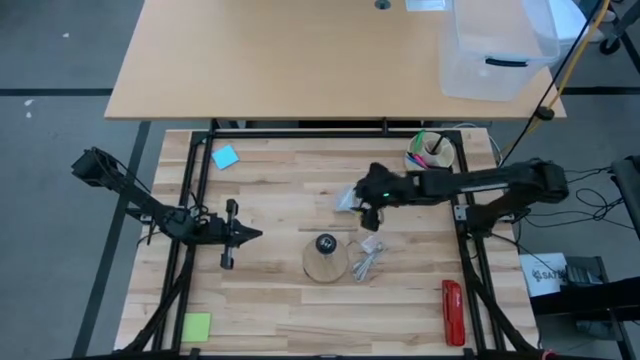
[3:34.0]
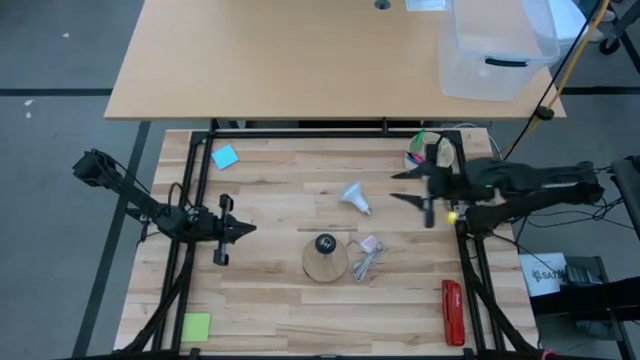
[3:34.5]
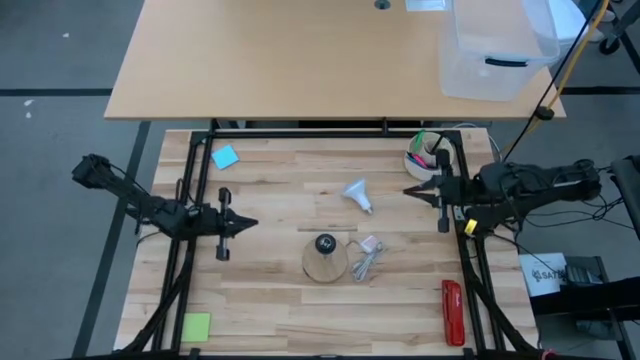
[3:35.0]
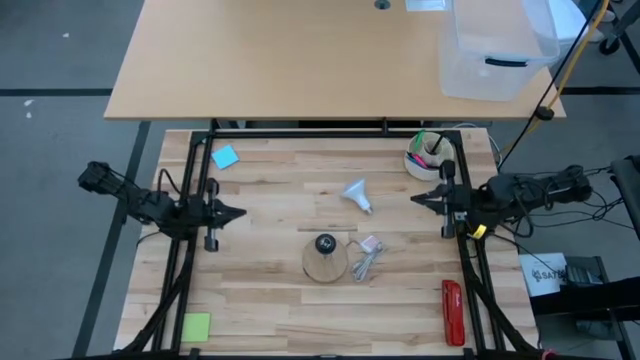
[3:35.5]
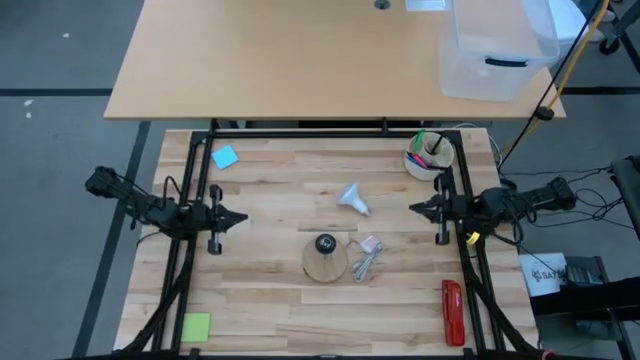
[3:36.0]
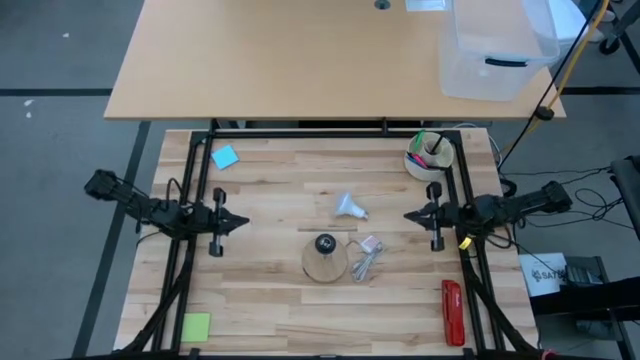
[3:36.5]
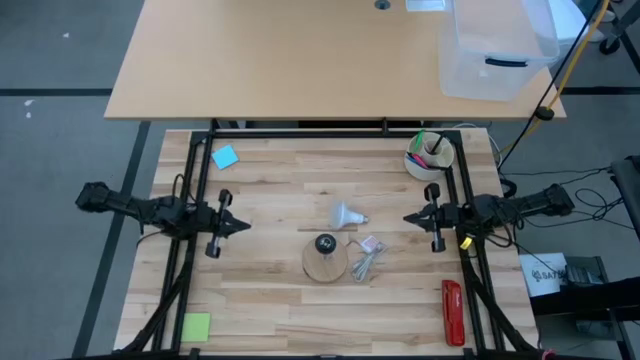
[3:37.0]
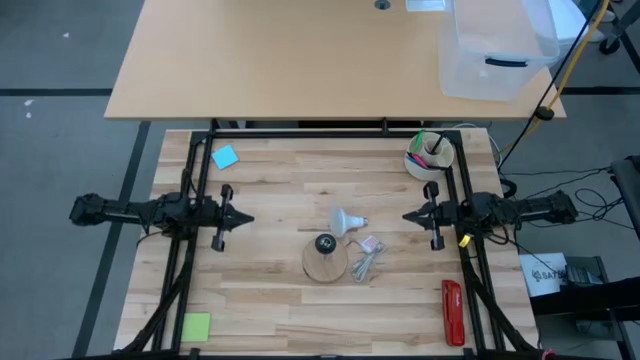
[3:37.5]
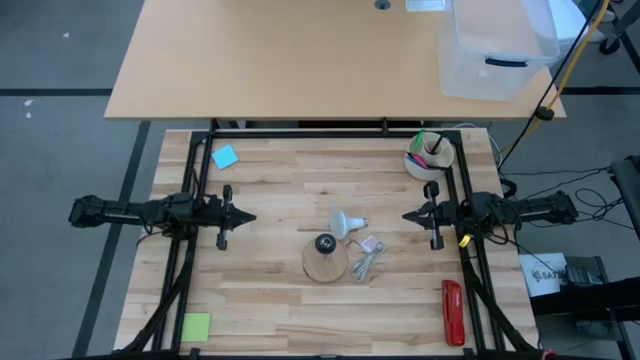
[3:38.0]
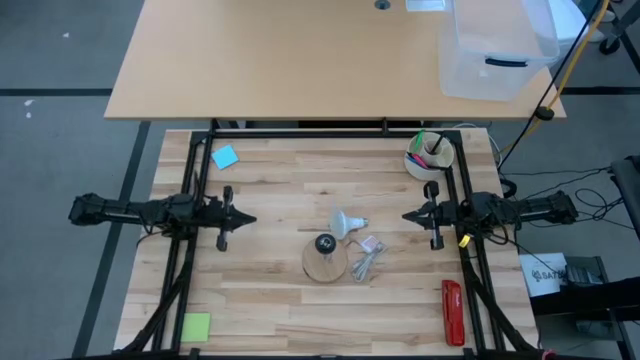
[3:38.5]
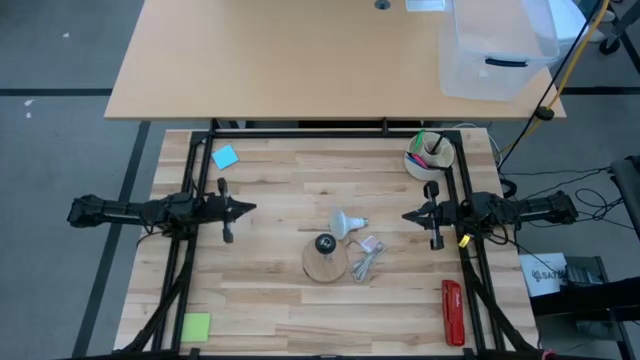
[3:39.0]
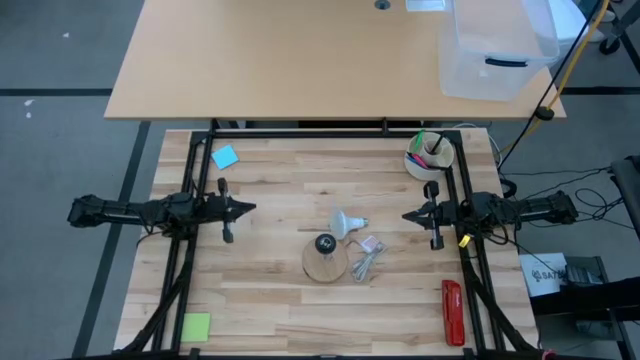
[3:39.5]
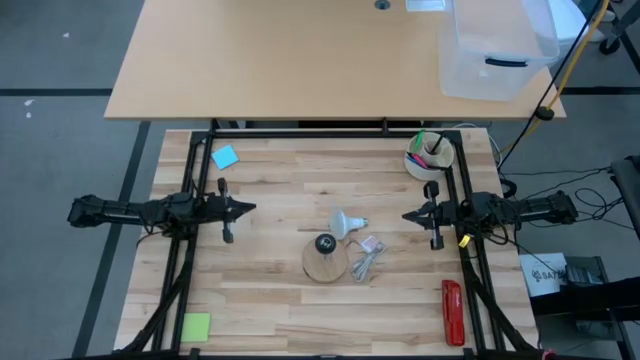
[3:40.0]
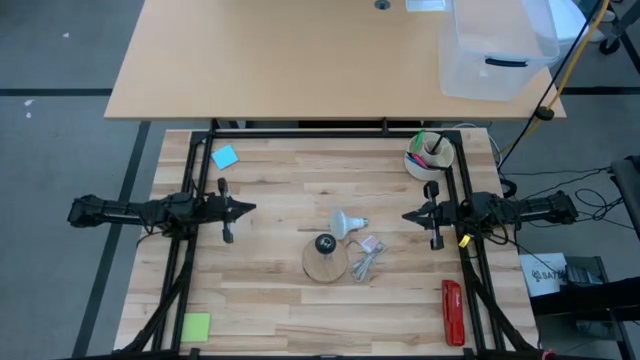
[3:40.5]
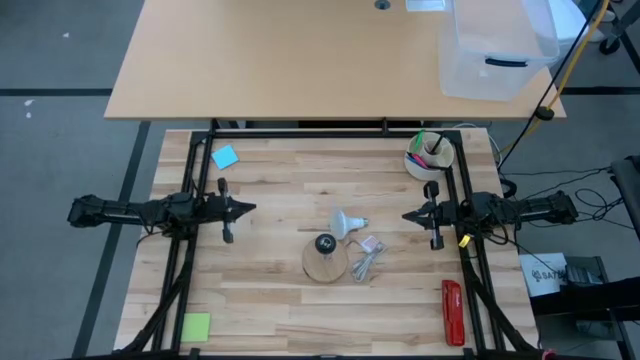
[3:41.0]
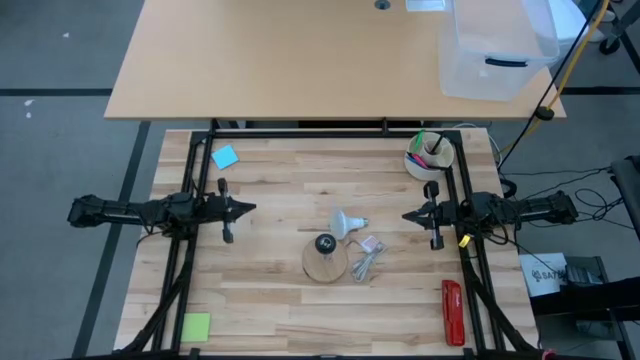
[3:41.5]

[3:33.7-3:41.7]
Task: Screw lightbulb
Return to Home Position

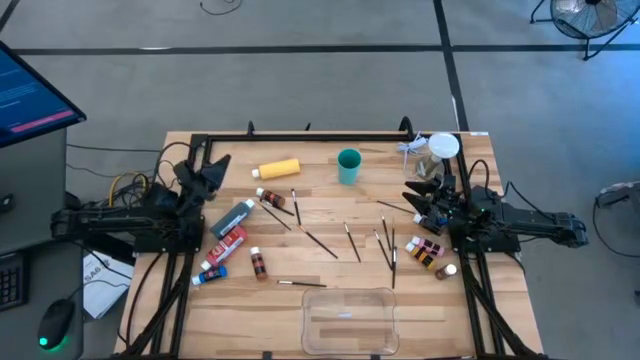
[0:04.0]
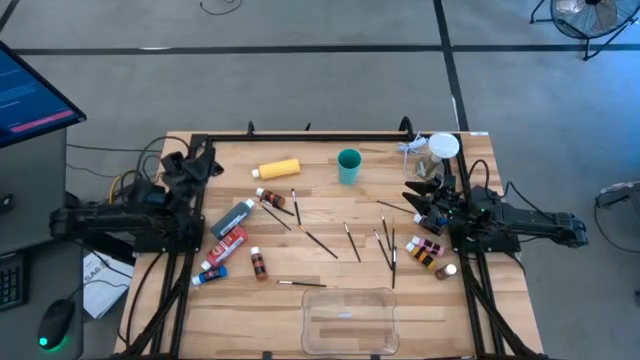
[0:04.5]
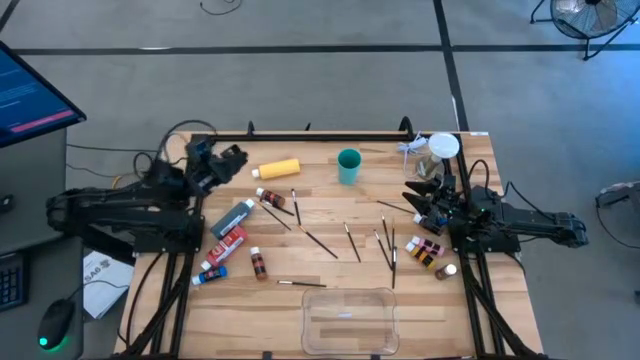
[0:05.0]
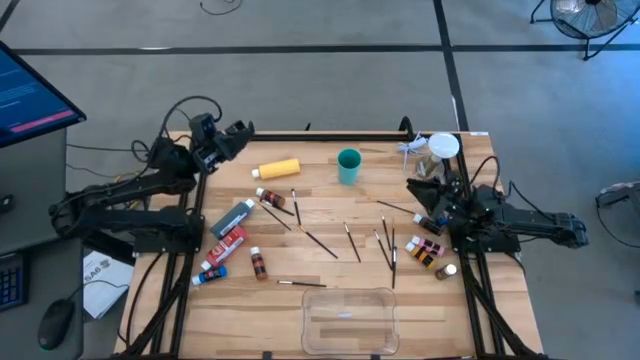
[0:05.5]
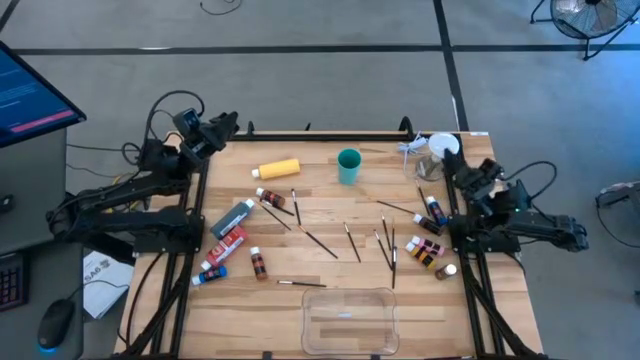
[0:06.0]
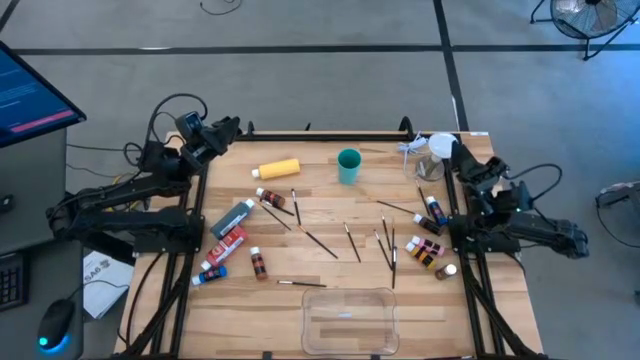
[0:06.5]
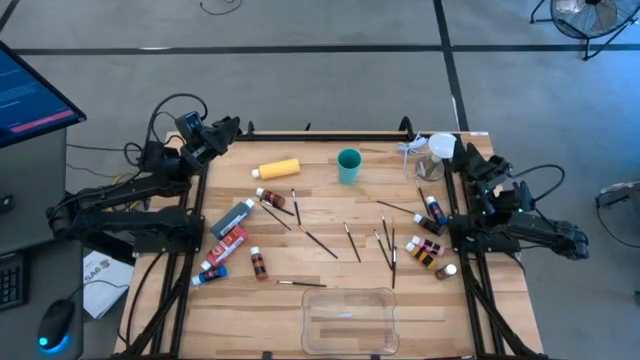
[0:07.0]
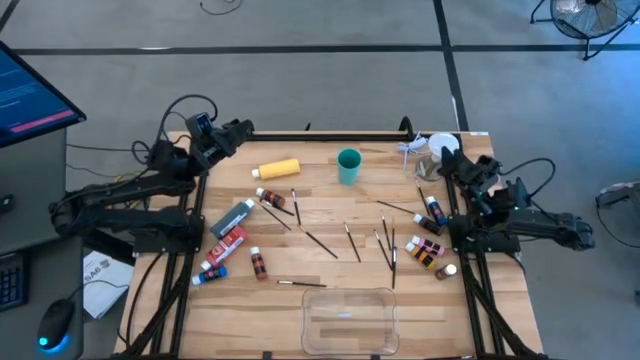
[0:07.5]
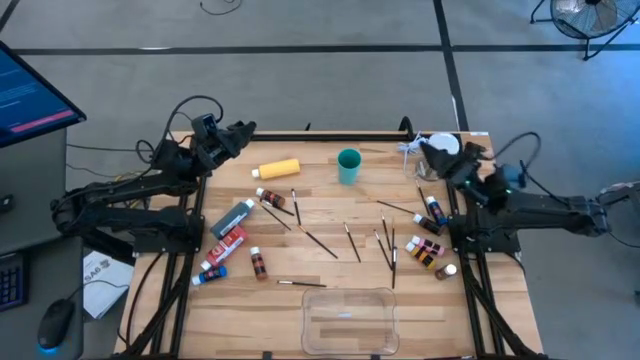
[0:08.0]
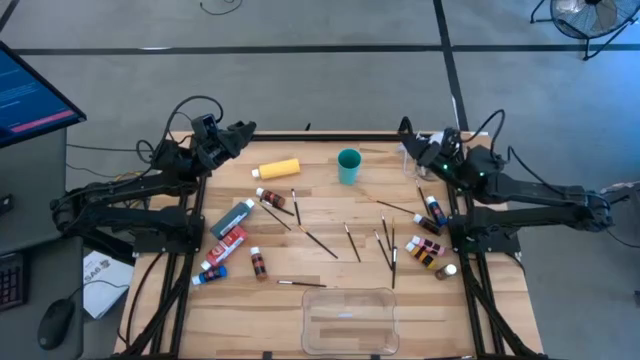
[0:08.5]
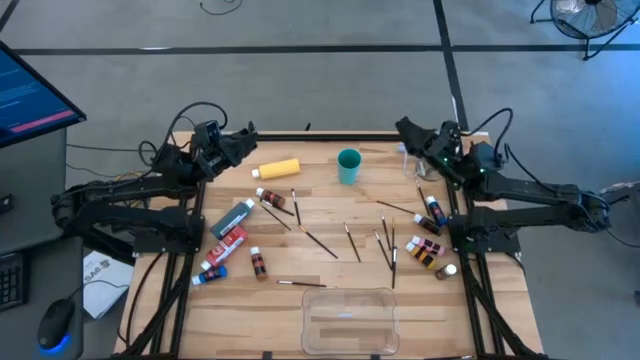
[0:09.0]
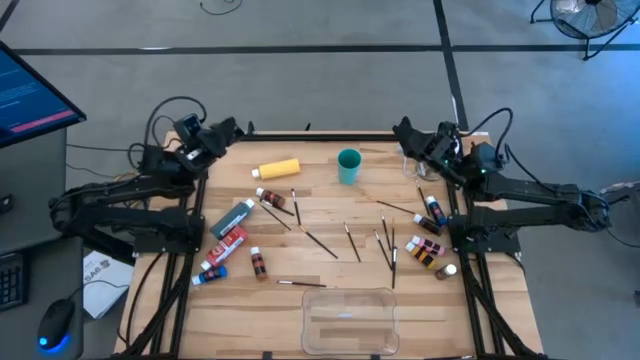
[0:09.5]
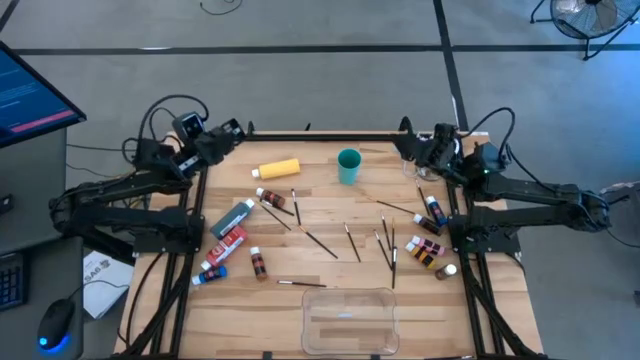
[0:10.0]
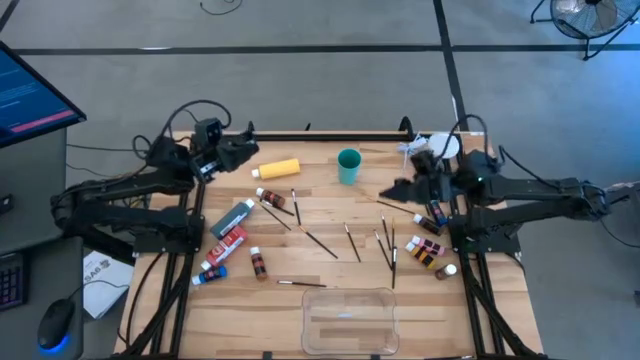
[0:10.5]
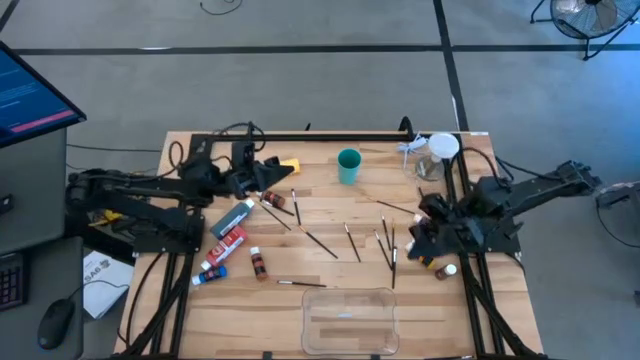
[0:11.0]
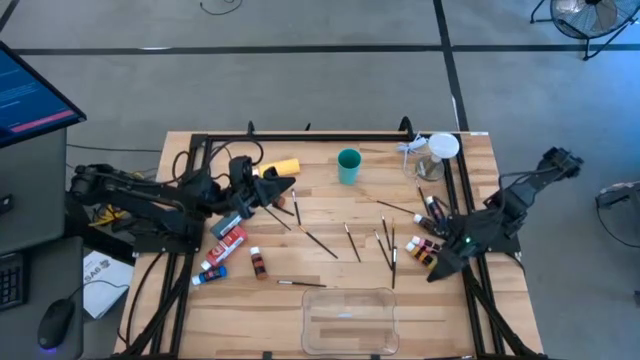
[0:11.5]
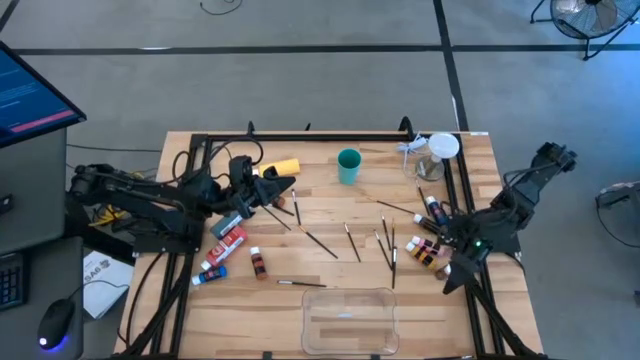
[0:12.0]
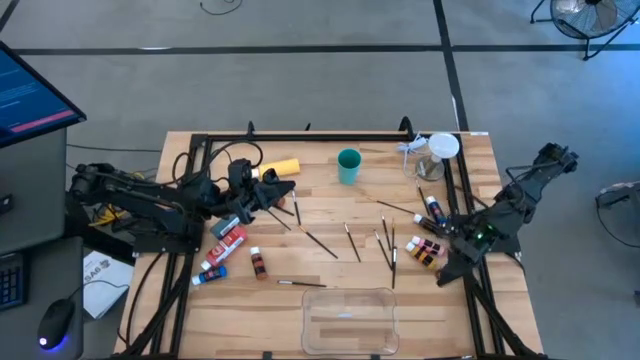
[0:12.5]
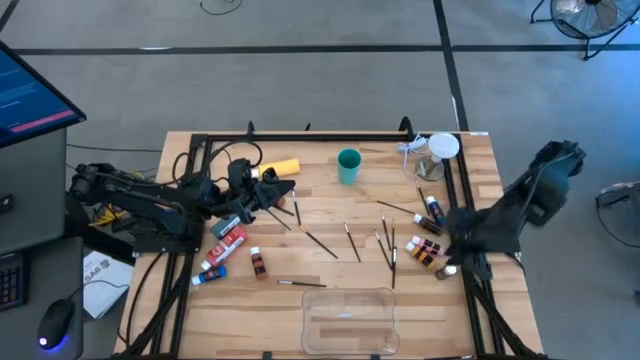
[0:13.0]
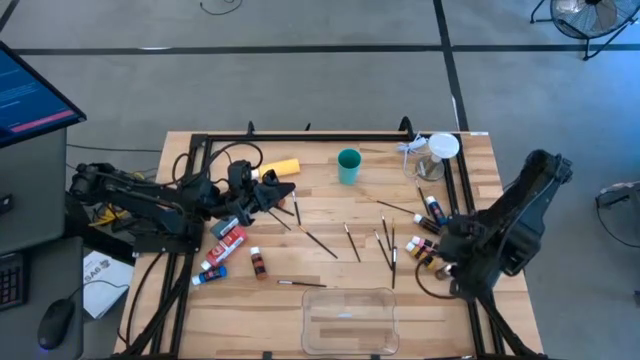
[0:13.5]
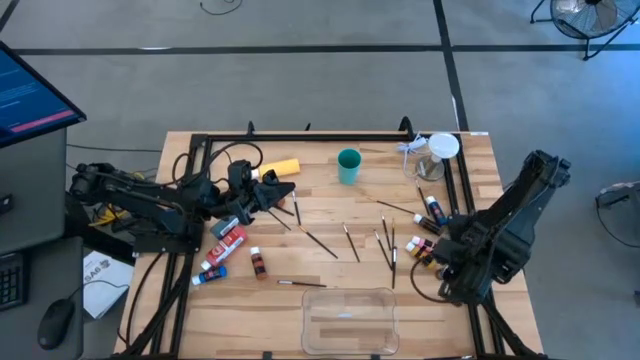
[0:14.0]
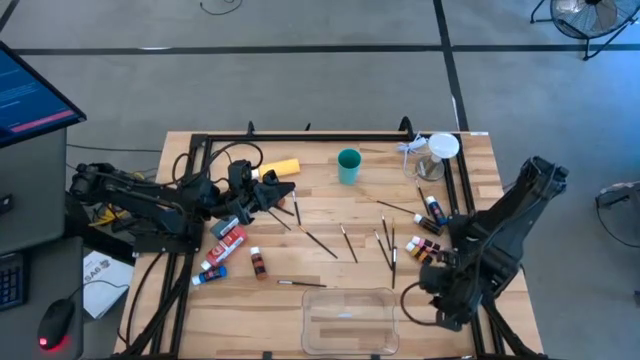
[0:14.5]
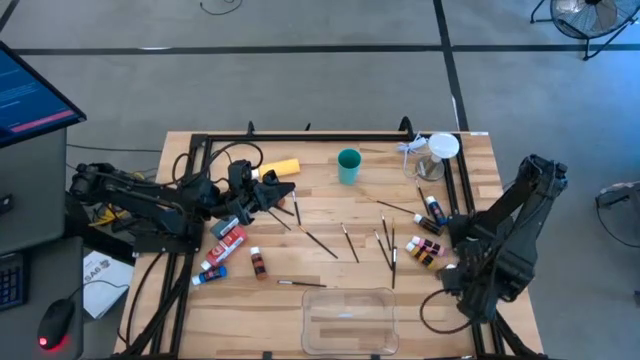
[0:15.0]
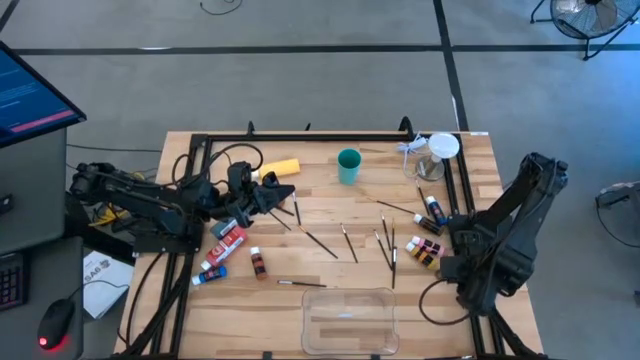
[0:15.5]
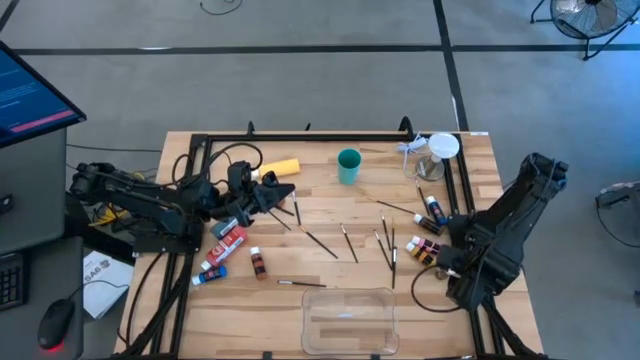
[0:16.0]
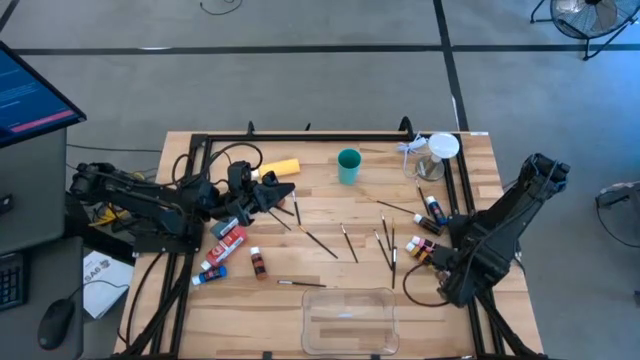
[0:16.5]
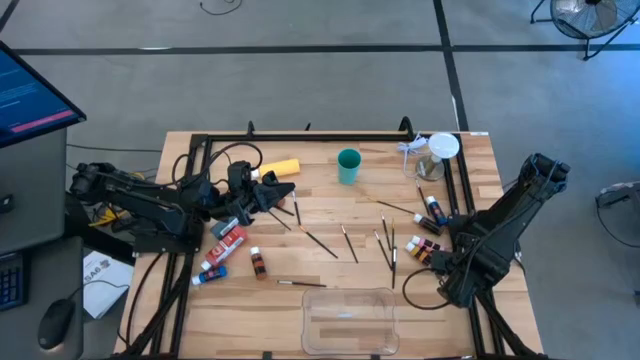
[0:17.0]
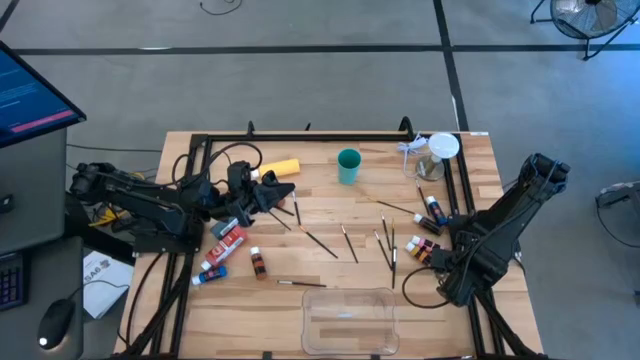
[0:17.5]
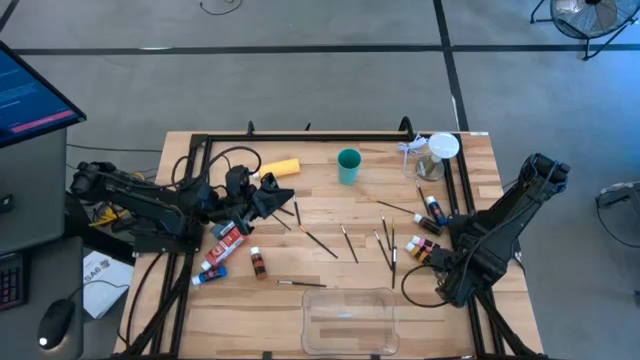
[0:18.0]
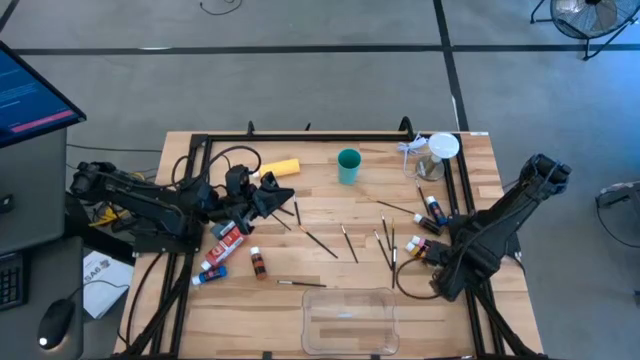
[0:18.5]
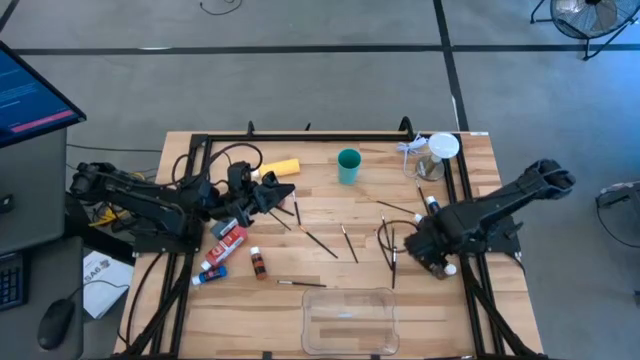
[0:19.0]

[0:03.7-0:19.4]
Task: Pick & Place Paint Supplies
Put the black paint bottle into the transparent bin
